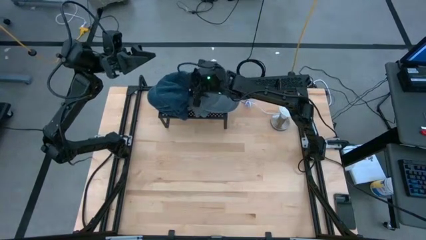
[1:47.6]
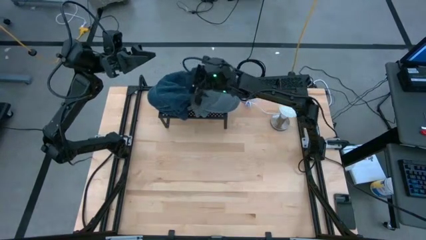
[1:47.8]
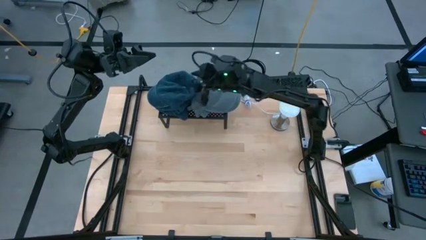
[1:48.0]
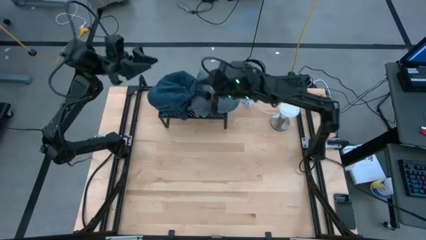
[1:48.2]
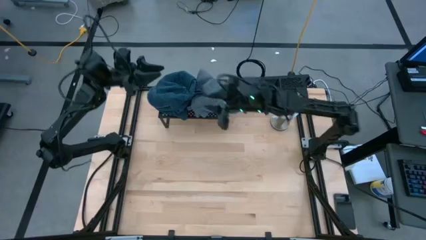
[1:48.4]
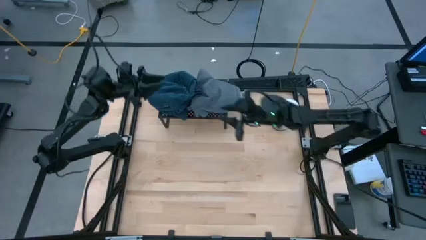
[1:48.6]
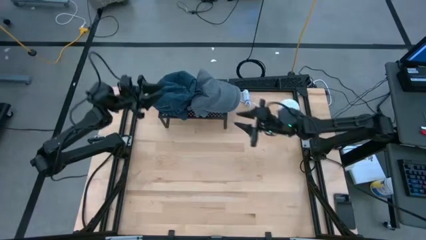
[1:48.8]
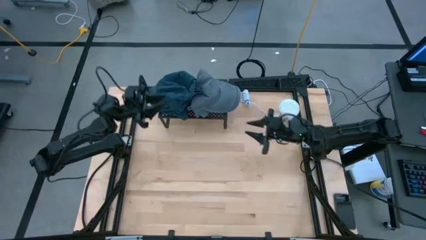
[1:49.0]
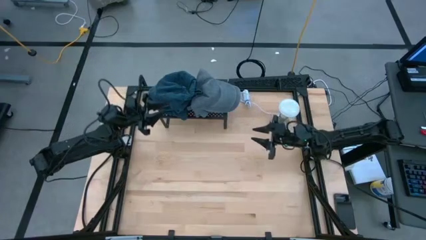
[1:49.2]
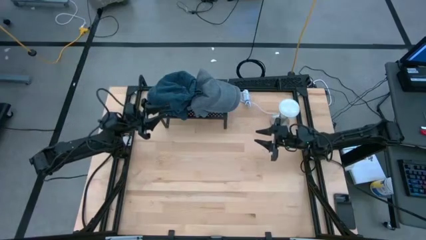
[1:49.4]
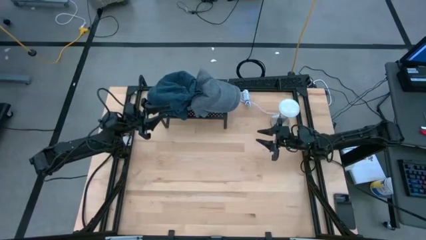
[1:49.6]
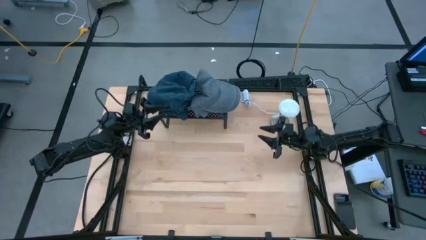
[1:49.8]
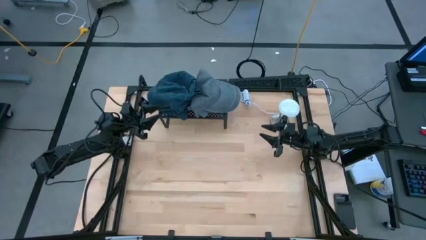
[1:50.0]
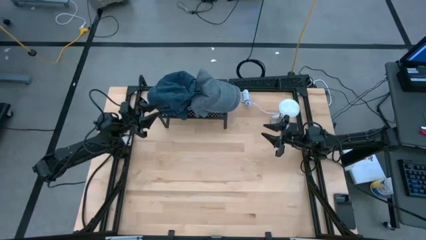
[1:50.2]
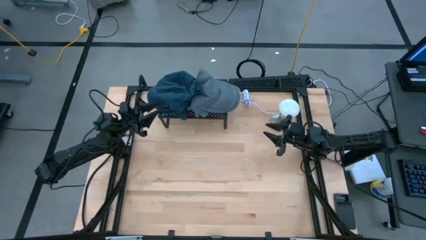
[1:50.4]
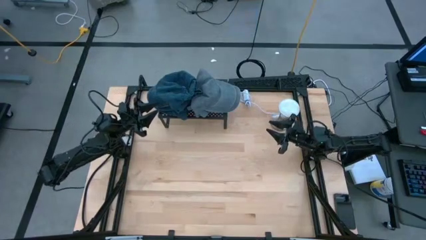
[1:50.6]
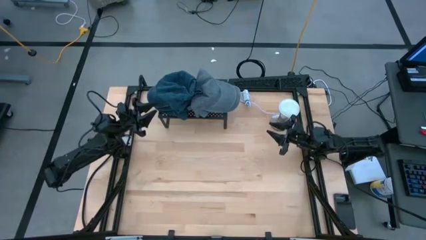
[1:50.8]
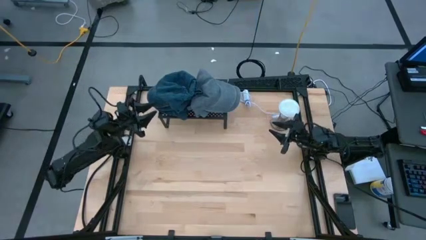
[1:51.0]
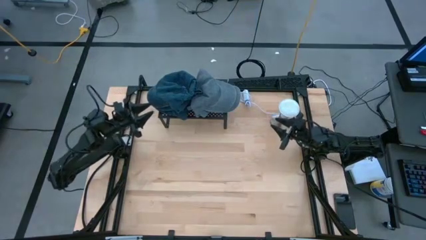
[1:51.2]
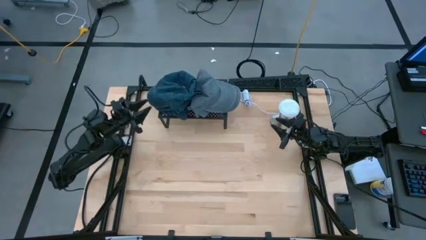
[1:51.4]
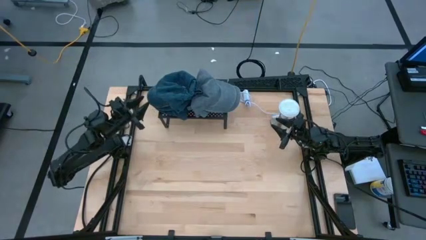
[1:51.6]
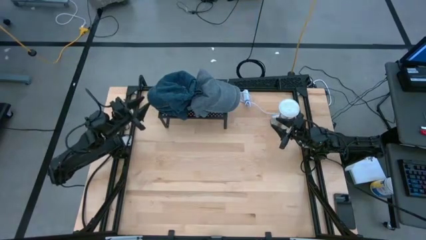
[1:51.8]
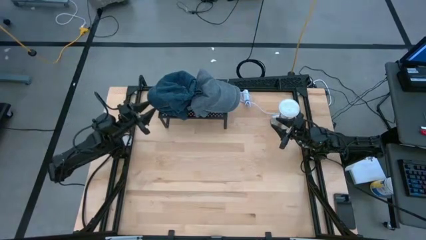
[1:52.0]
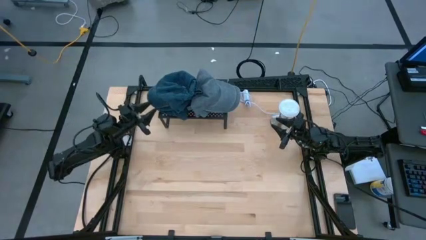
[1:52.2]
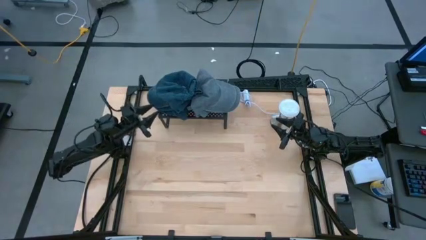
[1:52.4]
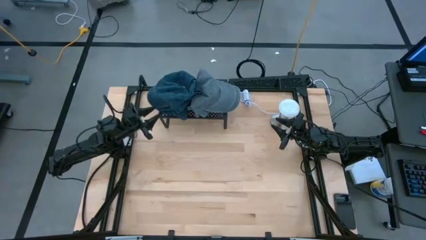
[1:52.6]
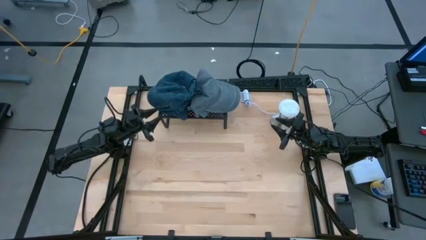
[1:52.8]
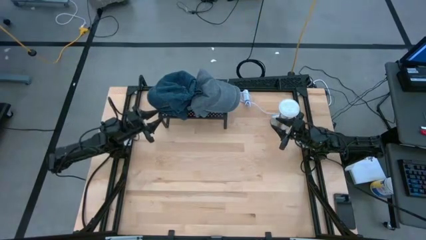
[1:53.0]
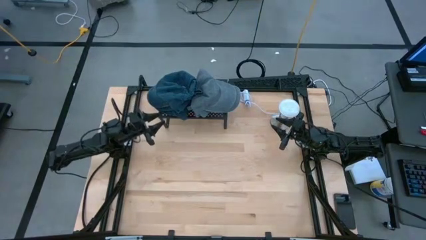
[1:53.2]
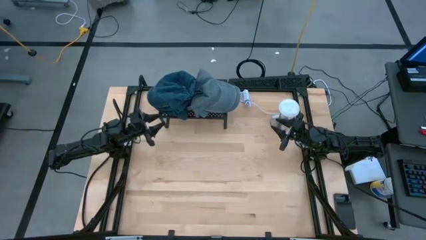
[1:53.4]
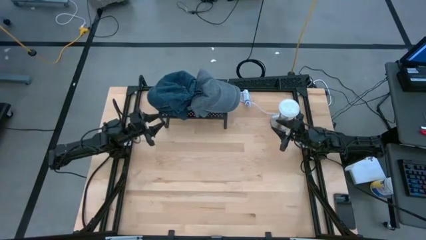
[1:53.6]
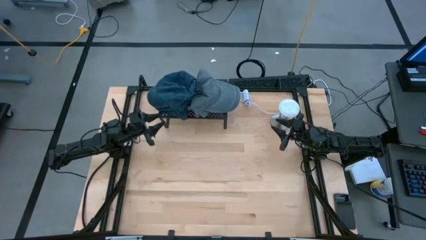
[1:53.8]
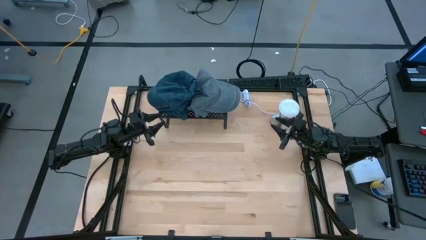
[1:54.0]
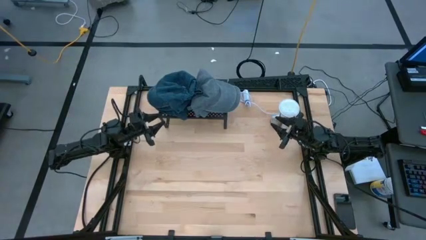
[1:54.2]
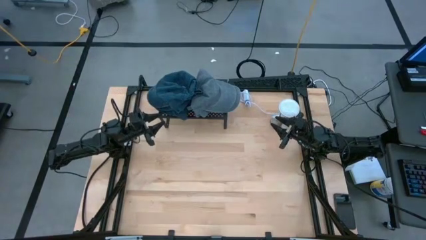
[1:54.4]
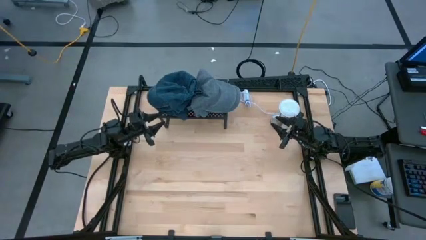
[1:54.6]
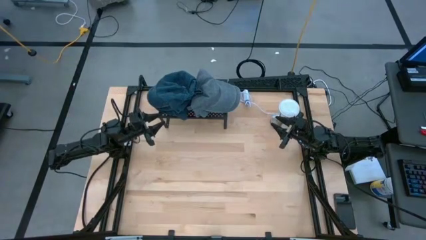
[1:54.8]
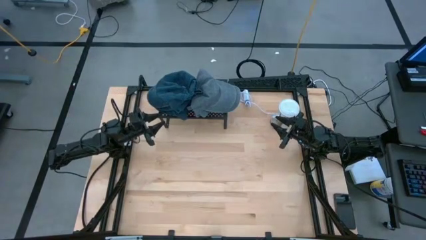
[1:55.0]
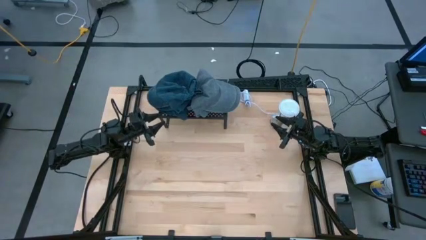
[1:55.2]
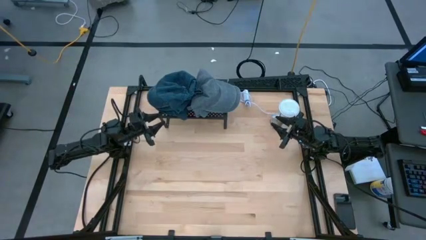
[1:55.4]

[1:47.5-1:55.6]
Task: Pick & Place hat
Return to Home Position

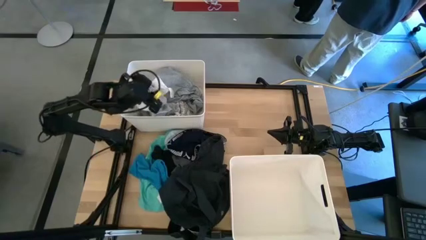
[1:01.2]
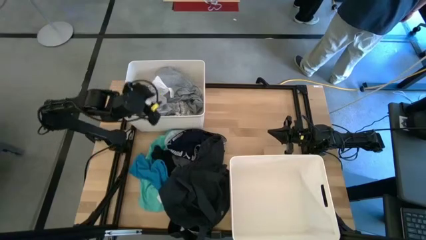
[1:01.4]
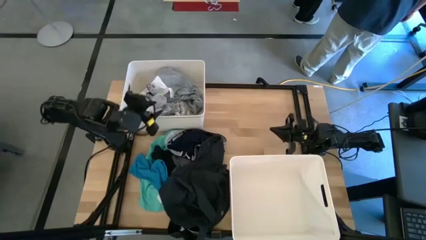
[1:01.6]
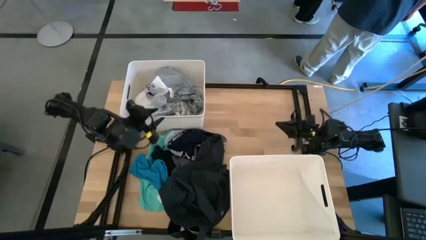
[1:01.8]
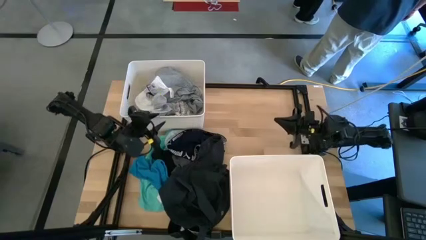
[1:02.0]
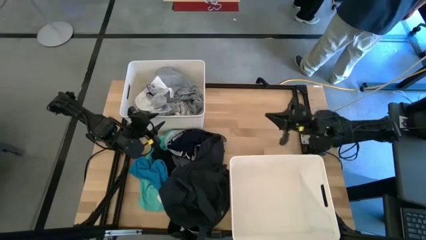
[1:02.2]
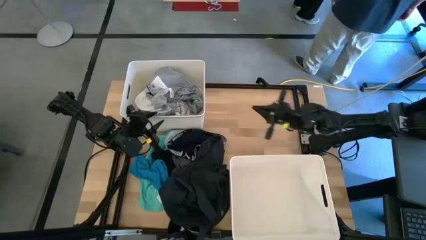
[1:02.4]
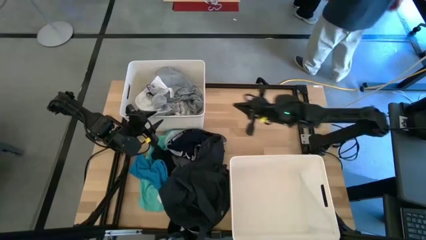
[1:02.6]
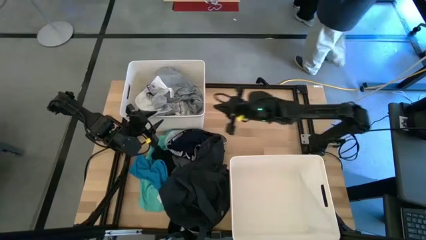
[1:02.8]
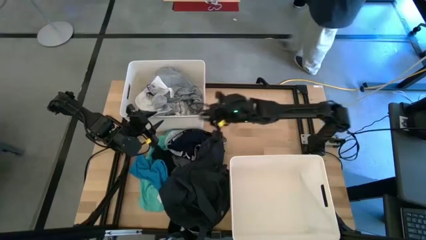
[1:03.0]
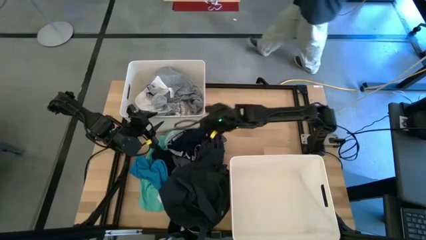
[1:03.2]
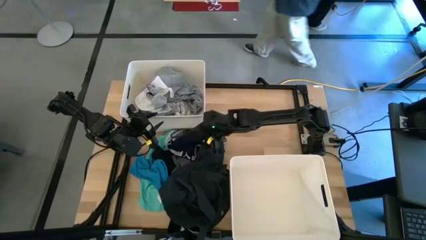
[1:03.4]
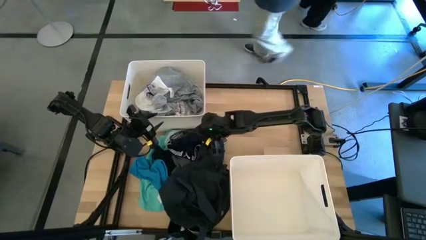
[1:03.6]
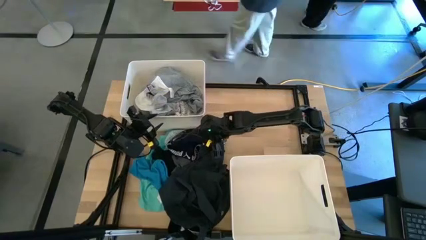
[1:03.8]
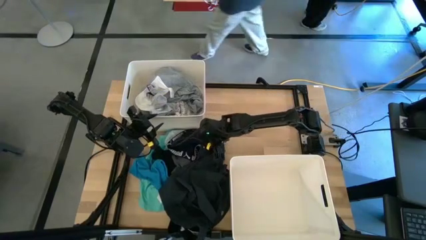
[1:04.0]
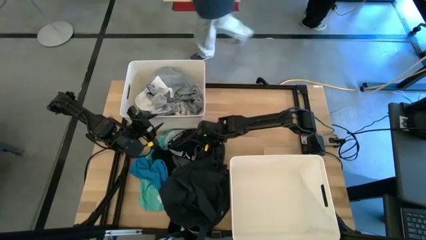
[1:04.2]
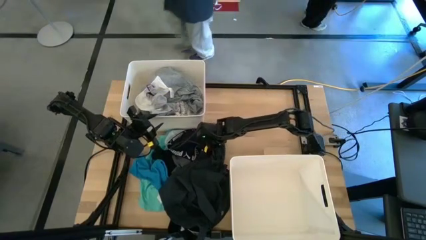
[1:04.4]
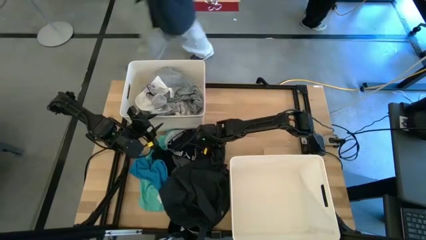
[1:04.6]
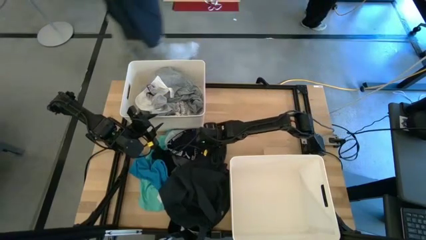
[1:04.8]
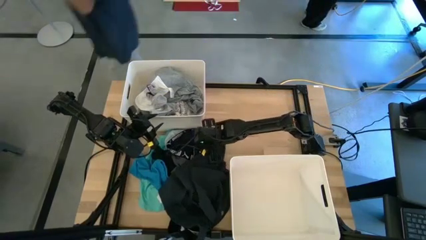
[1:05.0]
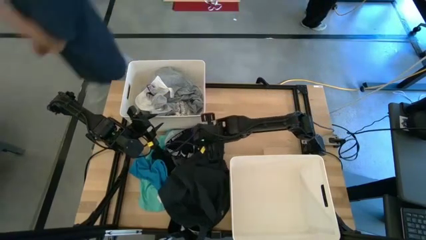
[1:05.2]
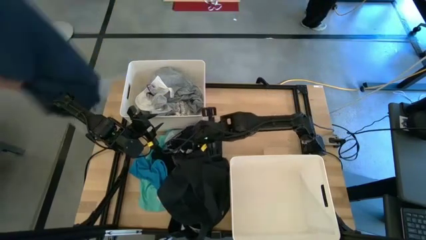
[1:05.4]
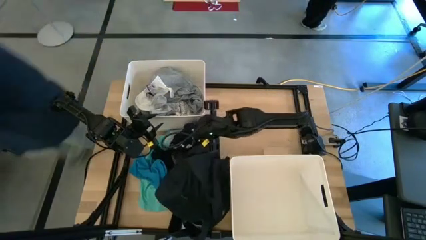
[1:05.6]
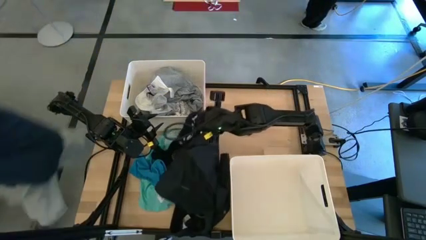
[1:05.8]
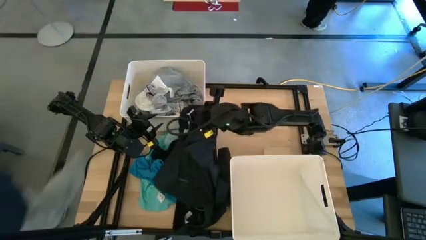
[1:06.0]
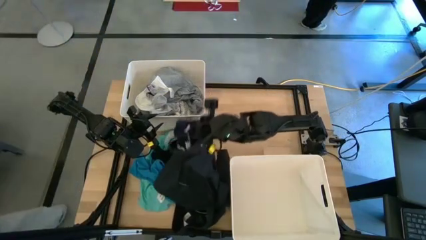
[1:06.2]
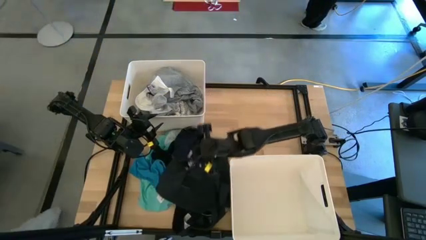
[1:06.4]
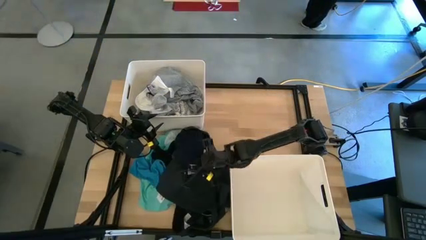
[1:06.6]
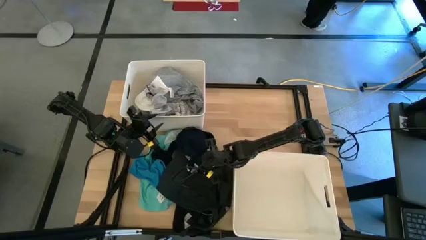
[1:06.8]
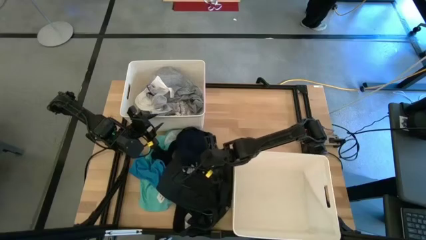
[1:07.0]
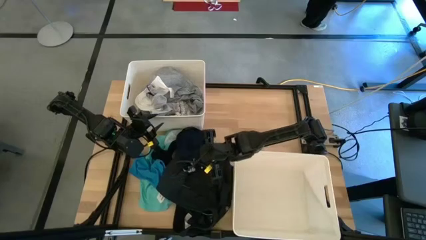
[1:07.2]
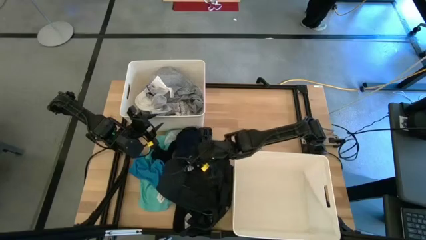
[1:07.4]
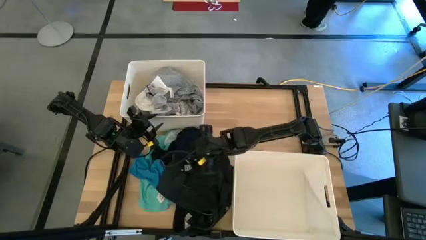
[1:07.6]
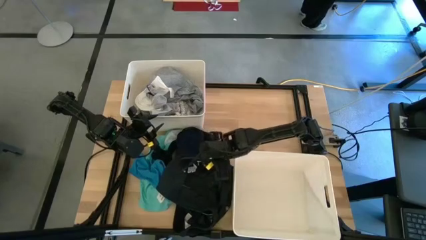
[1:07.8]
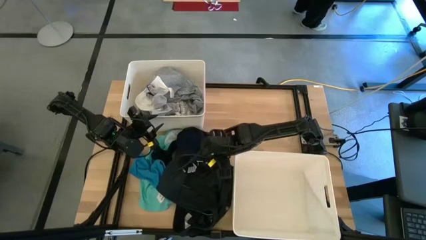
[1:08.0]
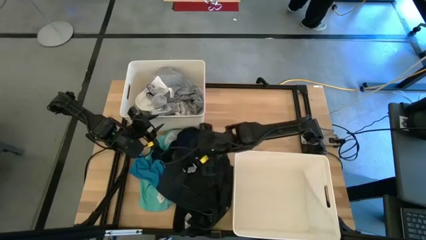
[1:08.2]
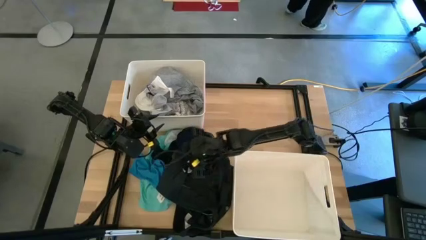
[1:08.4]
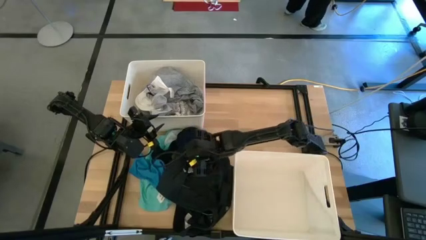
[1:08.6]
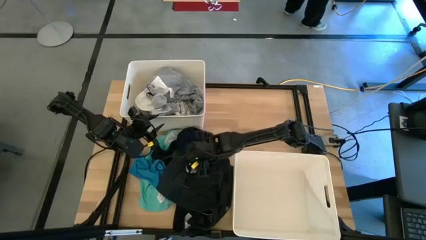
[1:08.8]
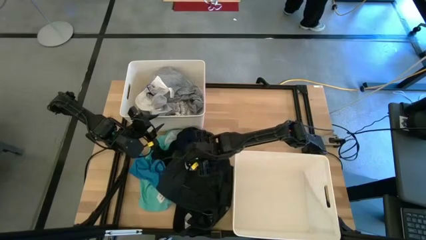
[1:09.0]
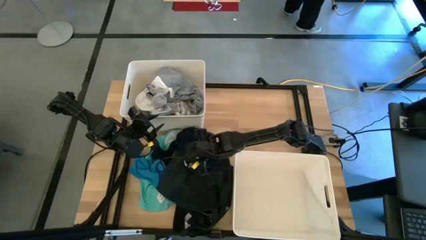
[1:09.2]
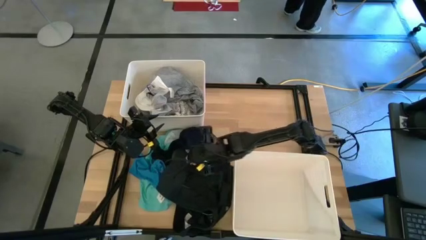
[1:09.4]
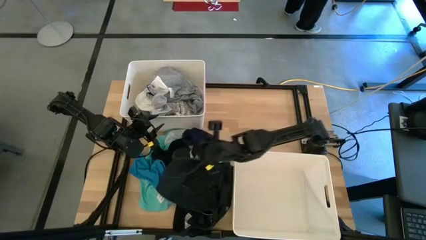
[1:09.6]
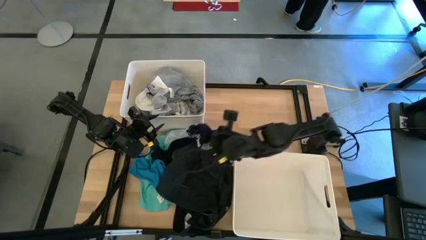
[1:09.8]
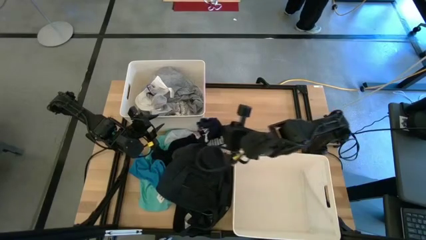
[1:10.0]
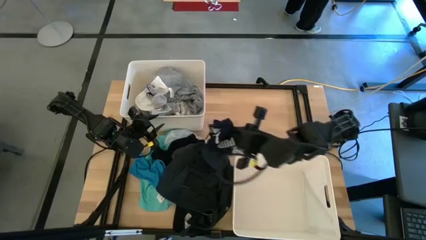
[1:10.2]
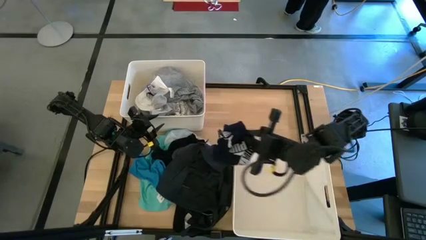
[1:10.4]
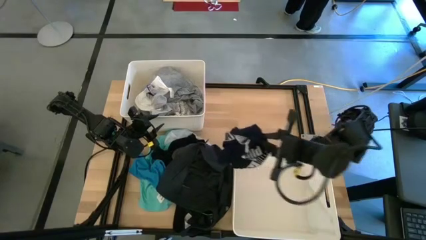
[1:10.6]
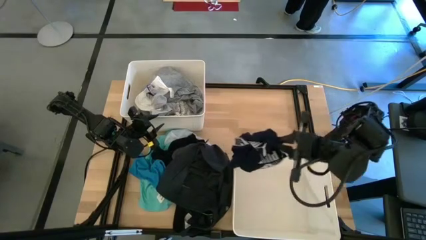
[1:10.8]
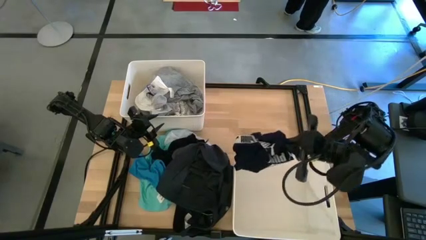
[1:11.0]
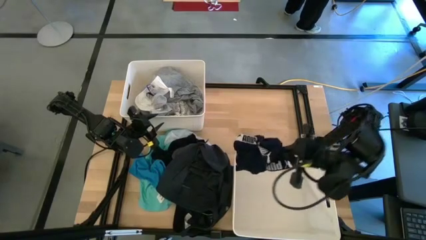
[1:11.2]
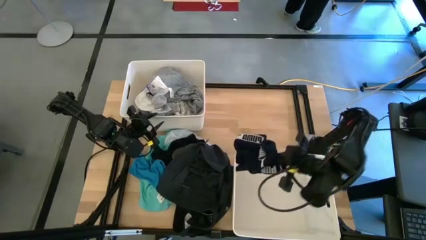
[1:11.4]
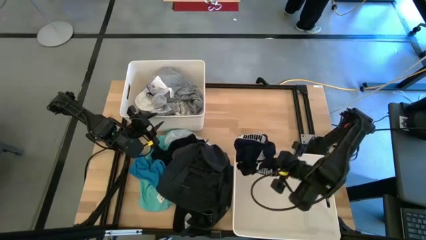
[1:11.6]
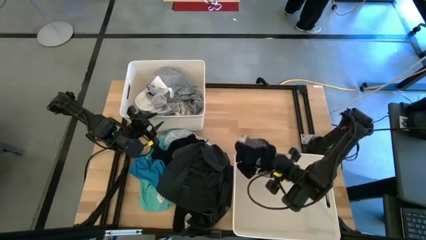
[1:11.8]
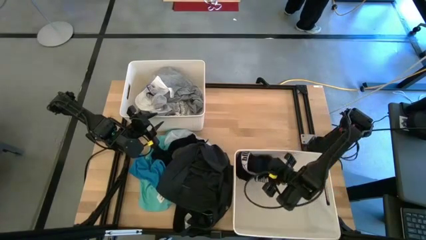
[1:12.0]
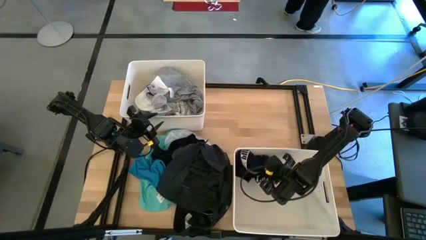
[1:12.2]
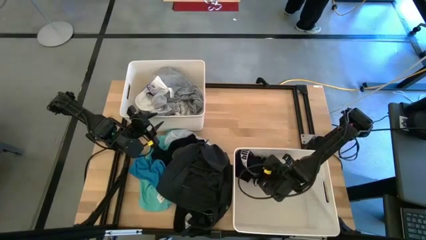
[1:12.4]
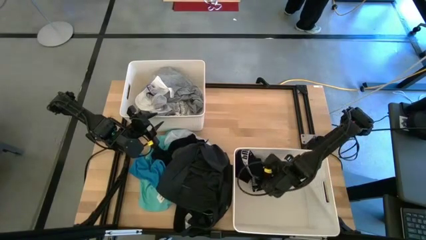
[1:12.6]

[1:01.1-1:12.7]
Task: Sort clothes
Put the dark blue boxer into the bottom right laundry bin
